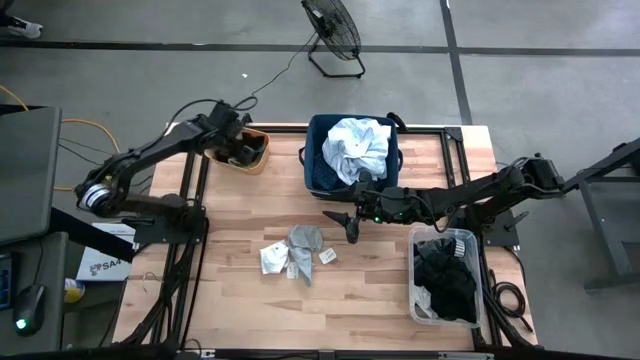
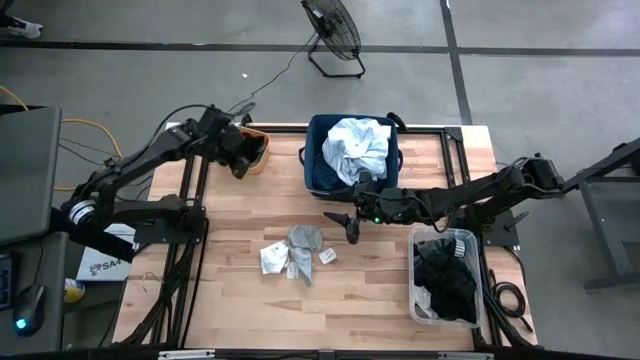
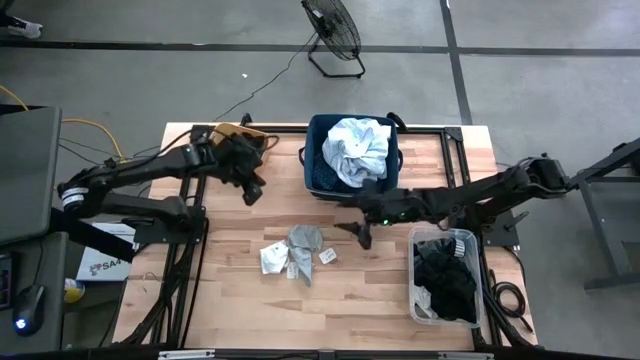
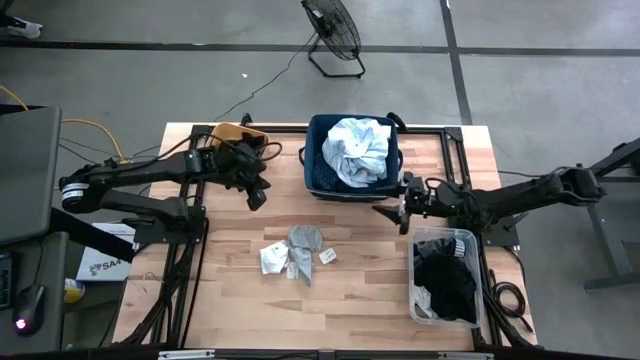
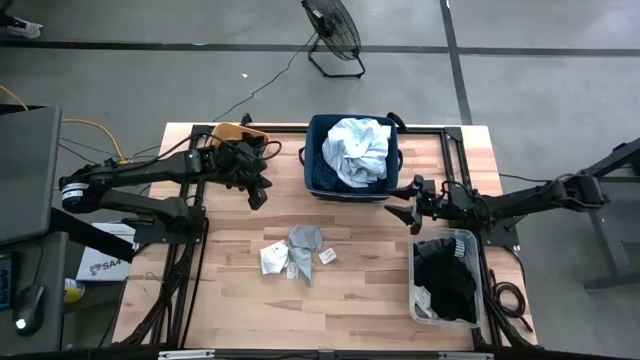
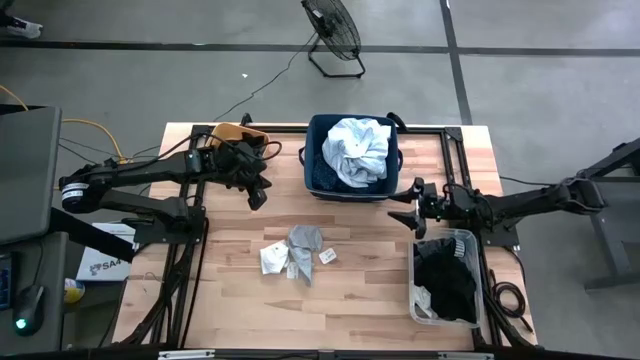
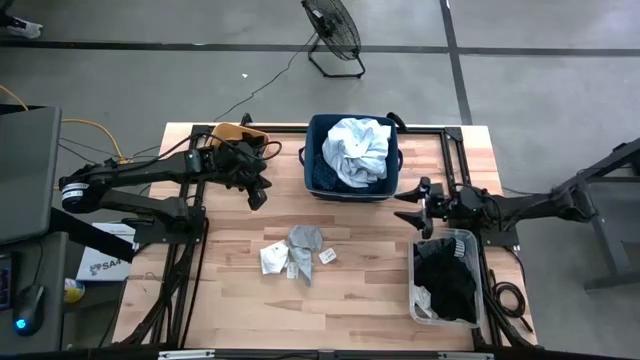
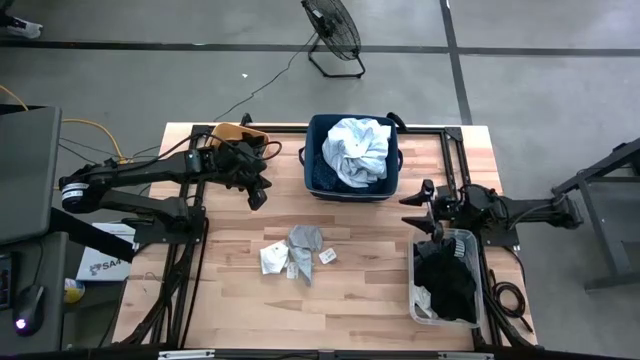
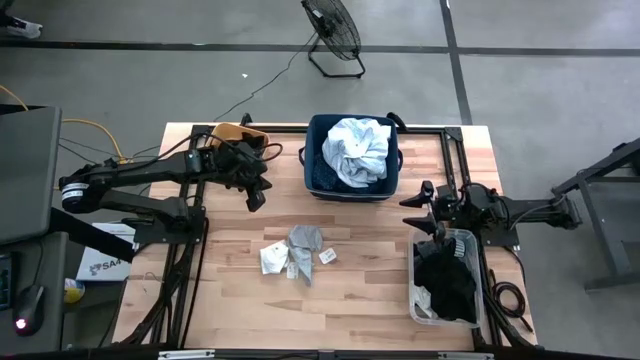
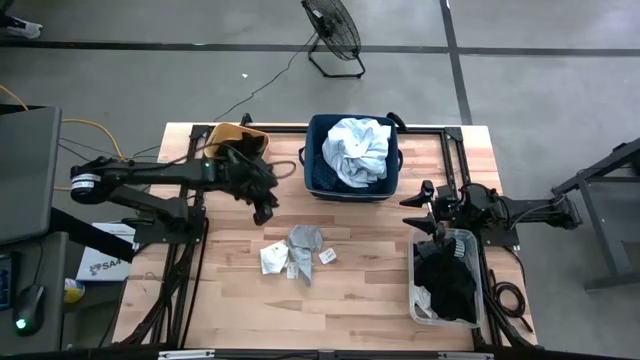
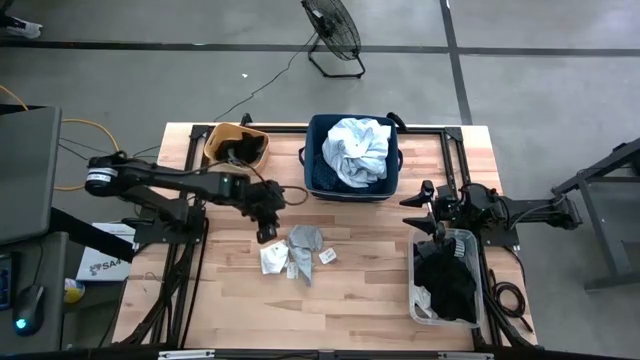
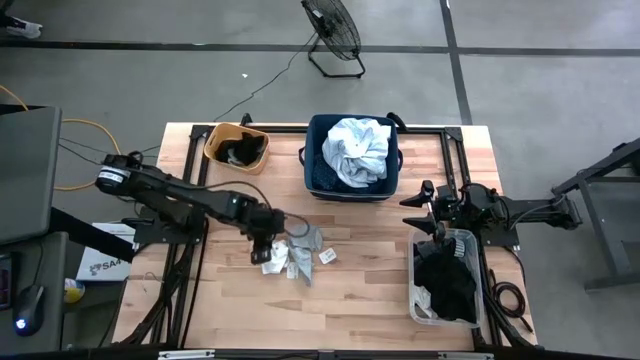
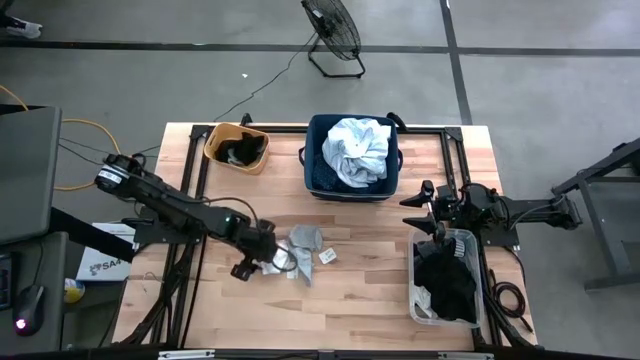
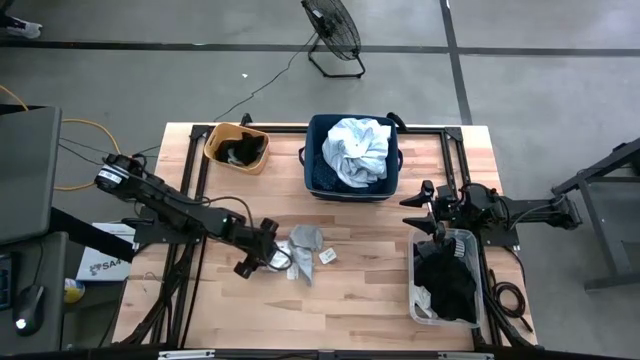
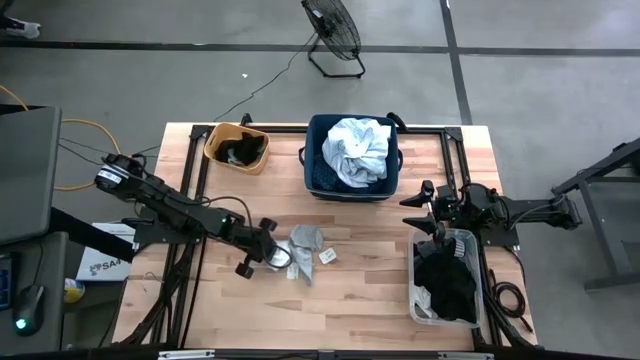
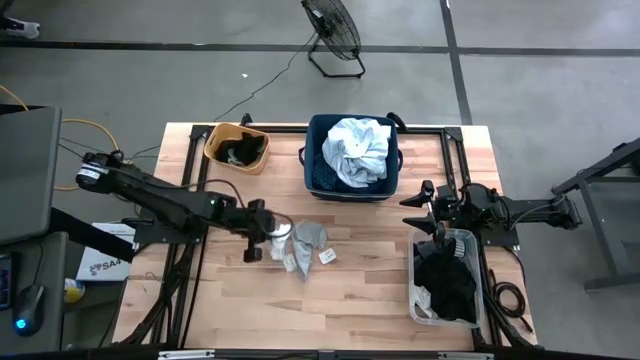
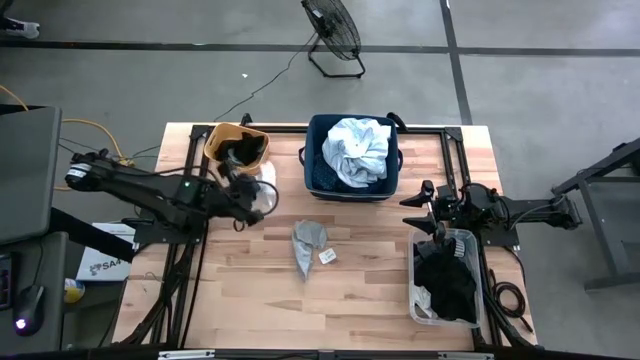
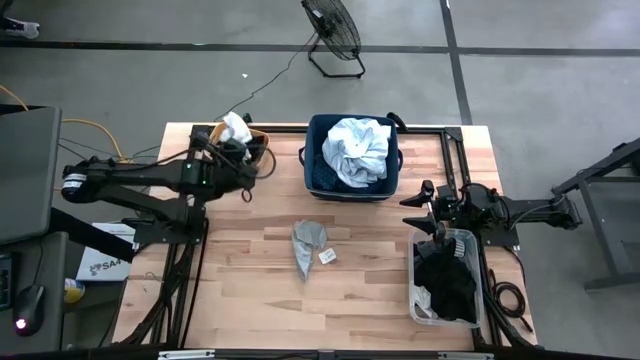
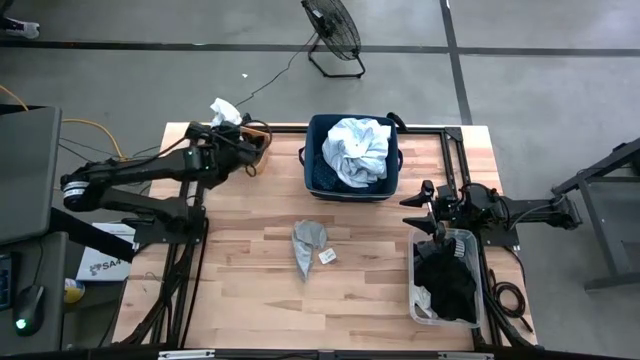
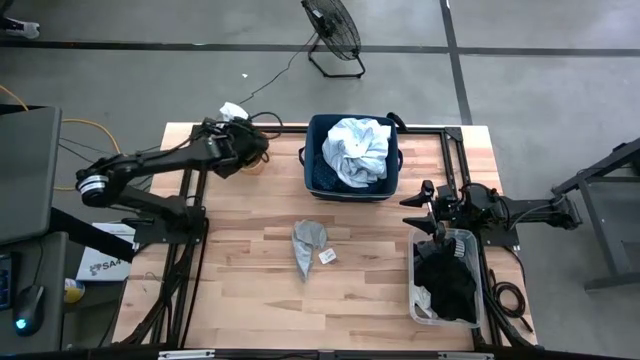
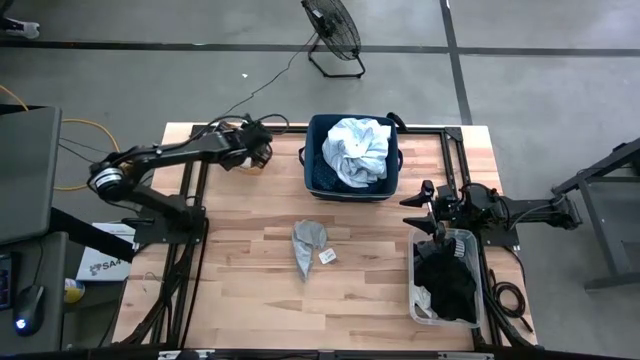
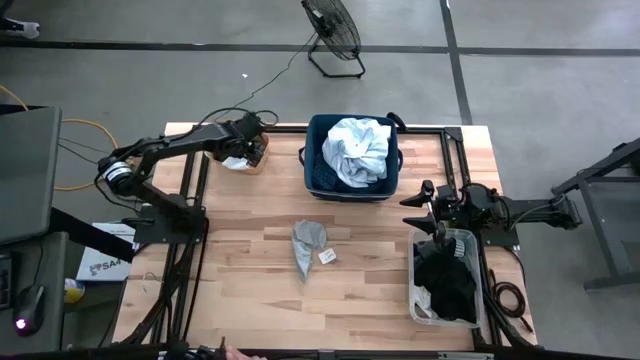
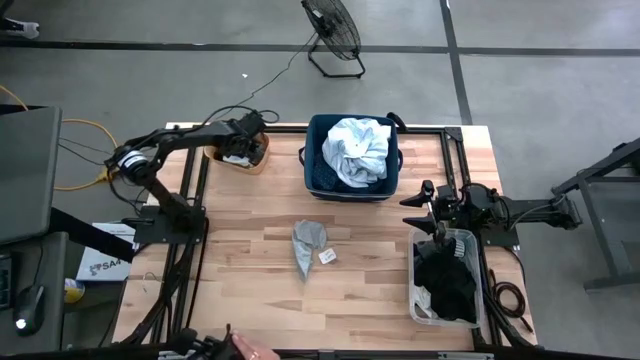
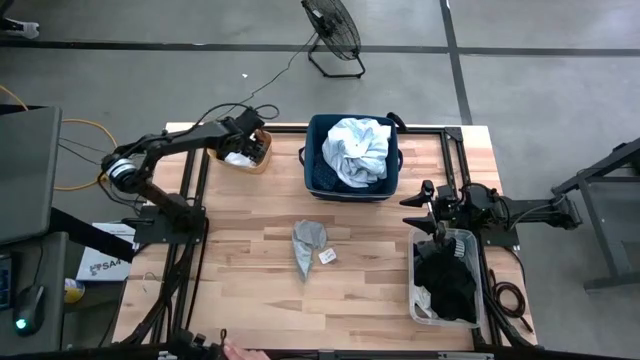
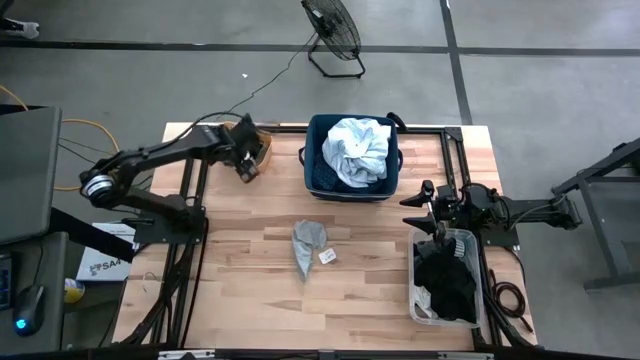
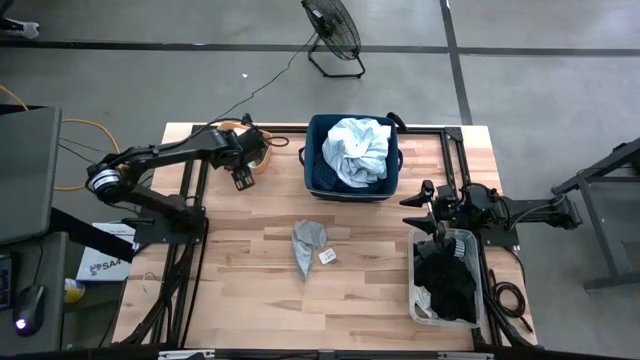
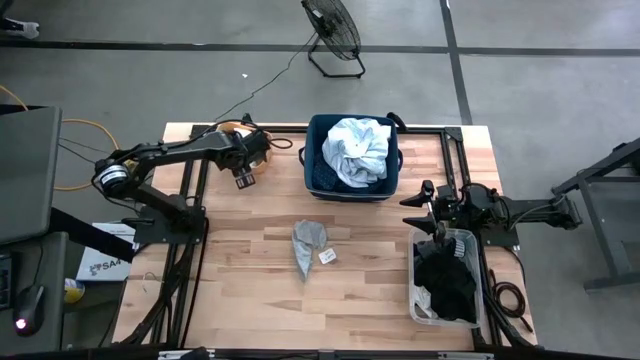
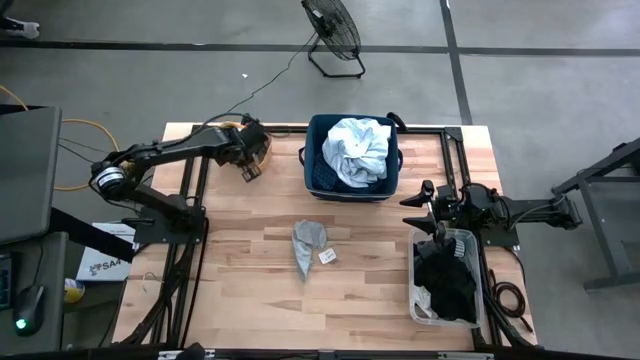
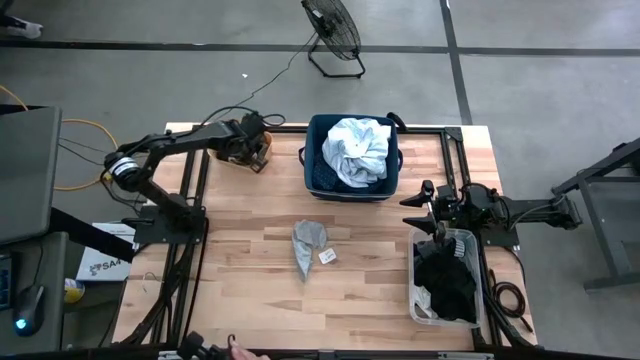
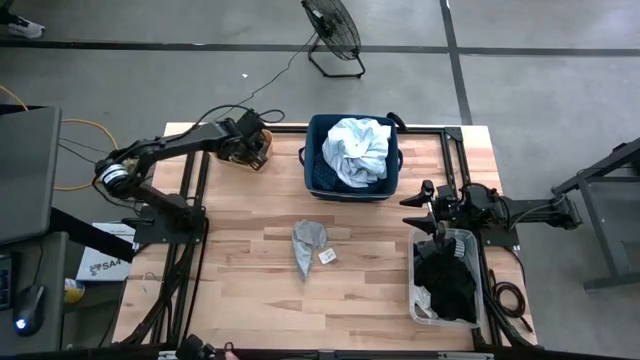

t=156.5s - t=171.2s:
Task: Pick & Place Cloths
Put the white sock into the yellow bin

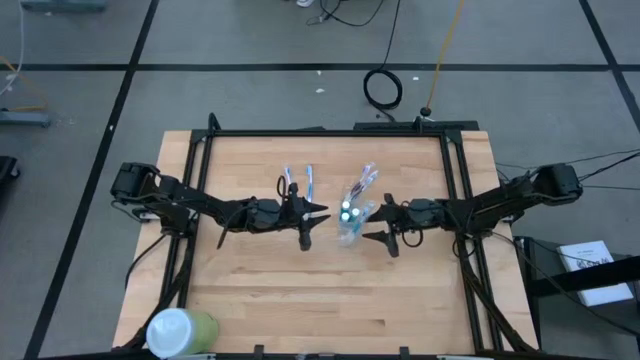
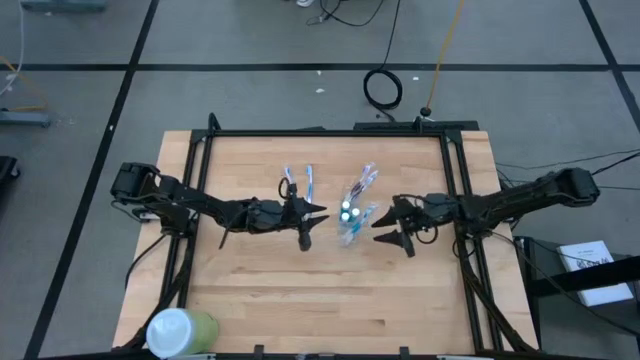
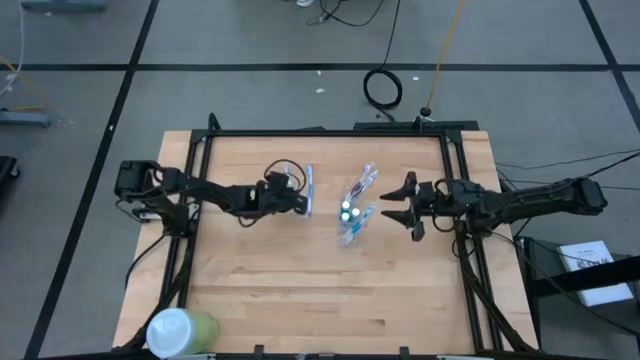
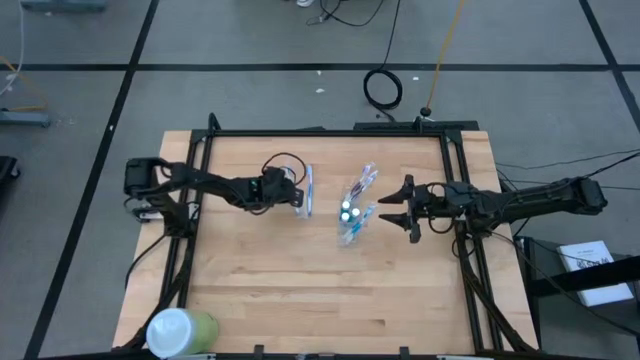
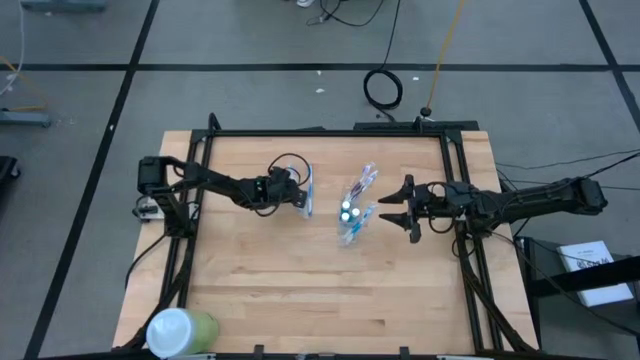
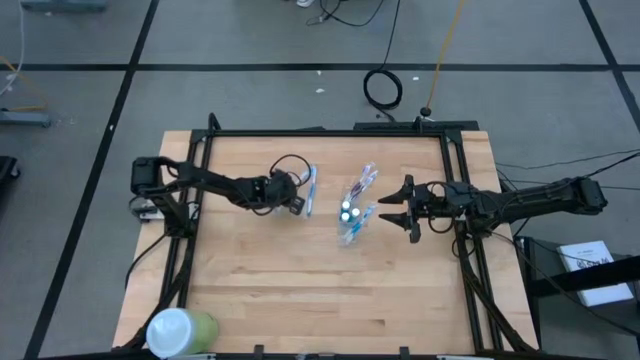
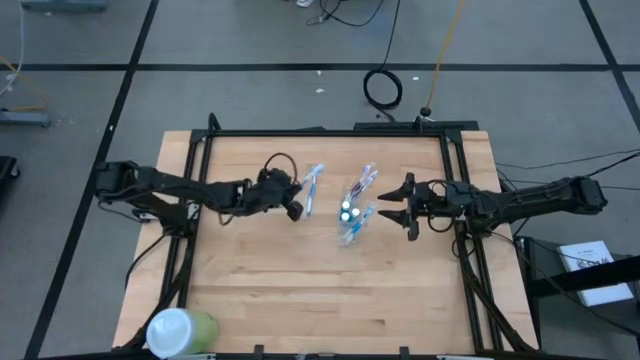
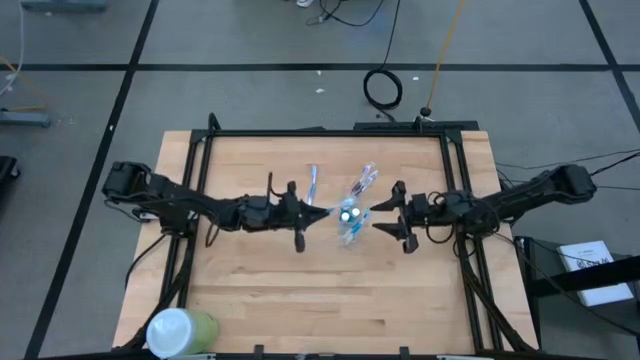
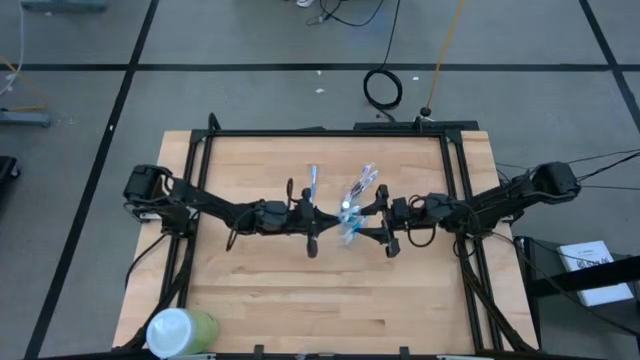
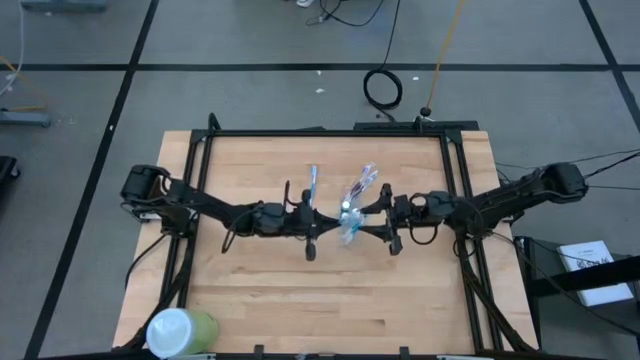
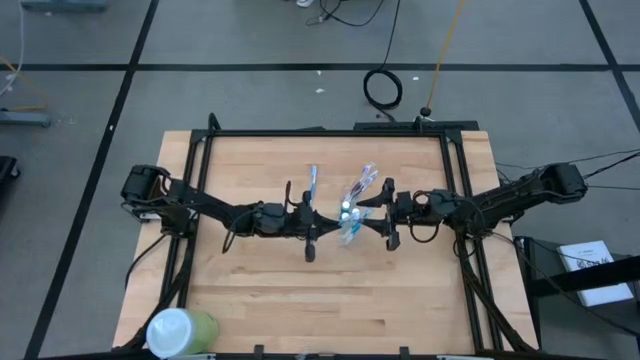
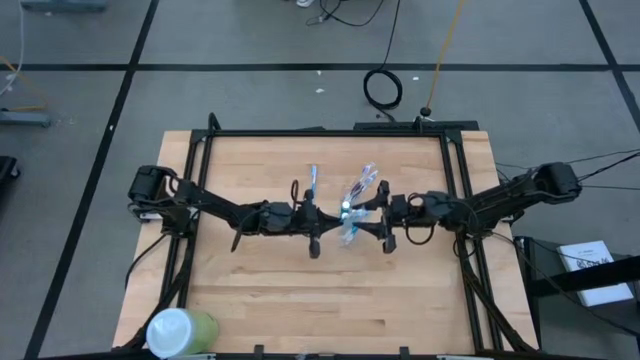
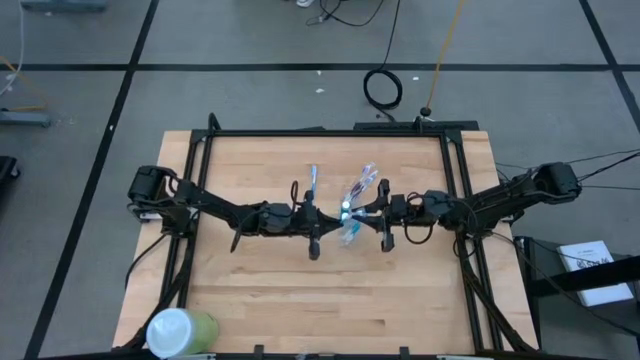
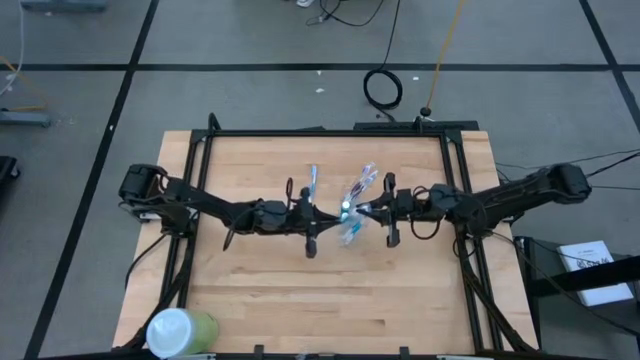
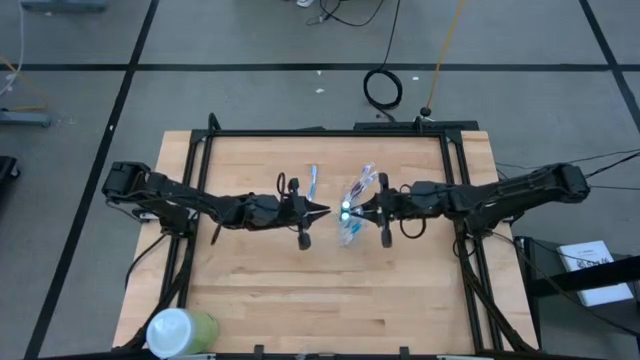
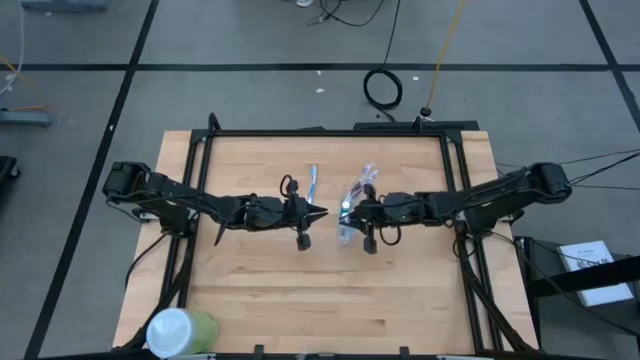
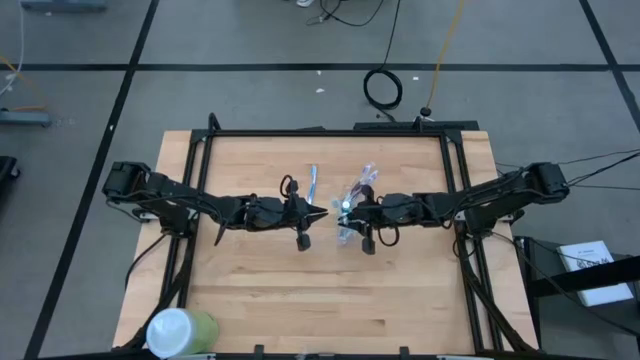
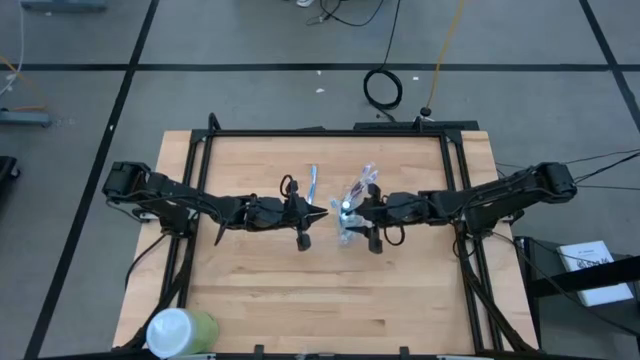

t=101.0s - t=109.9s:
Task: Pick & Place toothbrushing station
Put the blue toothbrush into the transparent organizer
